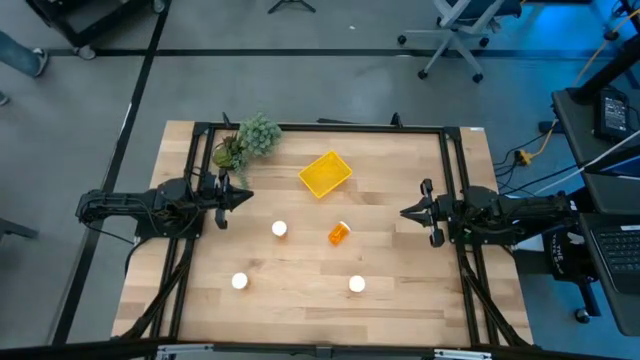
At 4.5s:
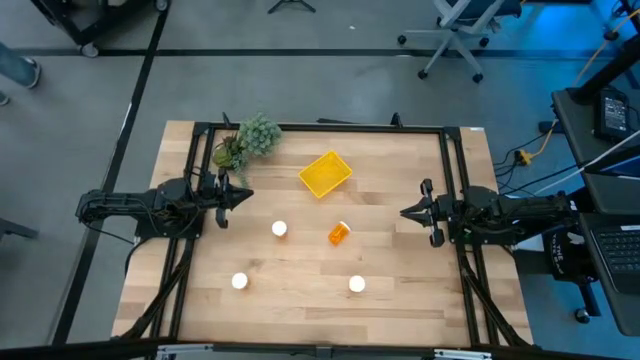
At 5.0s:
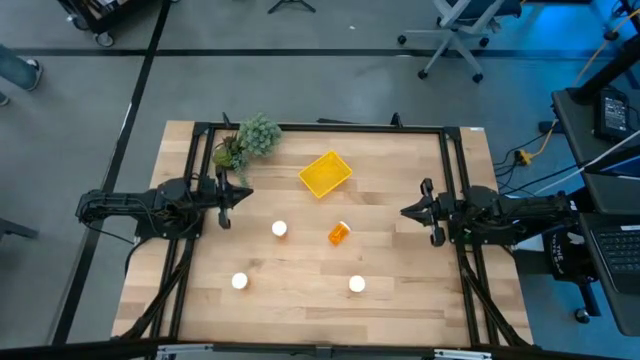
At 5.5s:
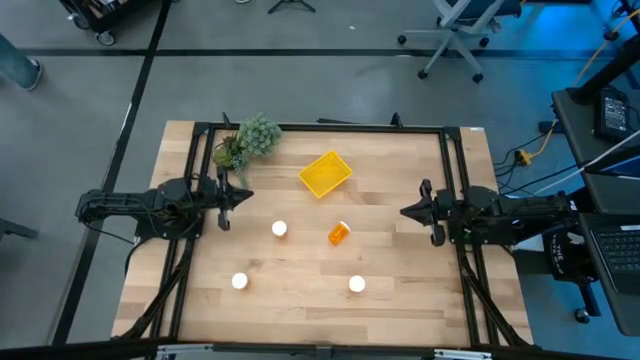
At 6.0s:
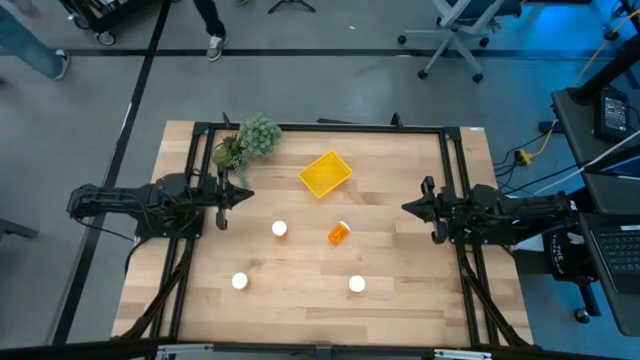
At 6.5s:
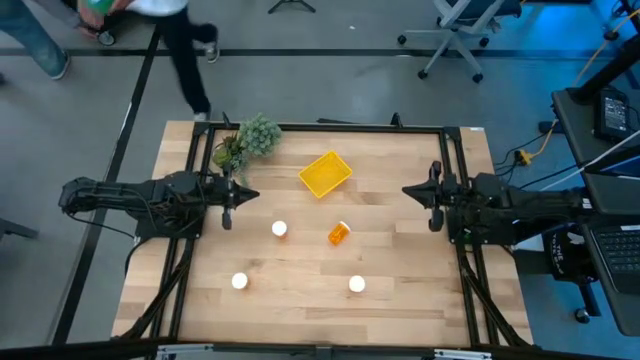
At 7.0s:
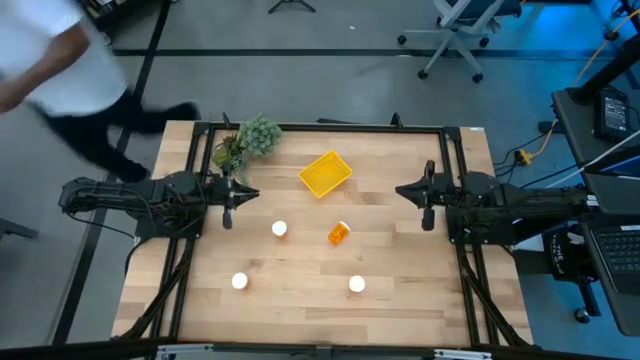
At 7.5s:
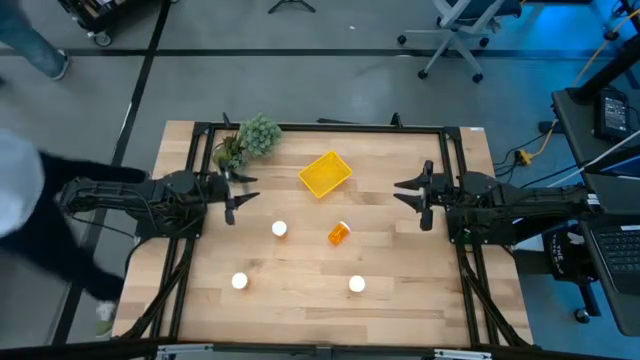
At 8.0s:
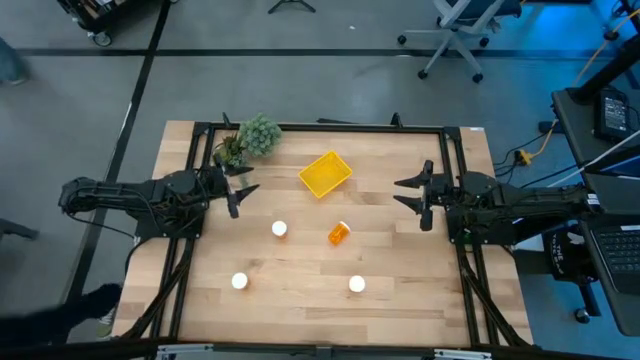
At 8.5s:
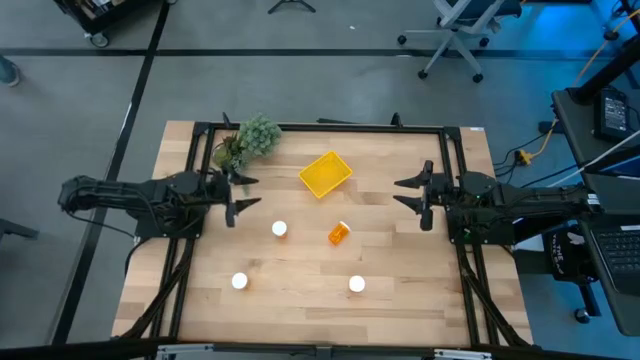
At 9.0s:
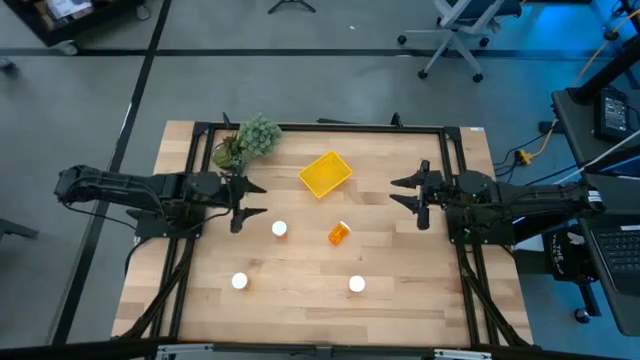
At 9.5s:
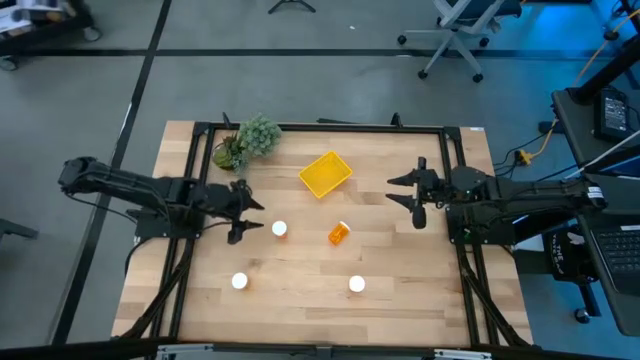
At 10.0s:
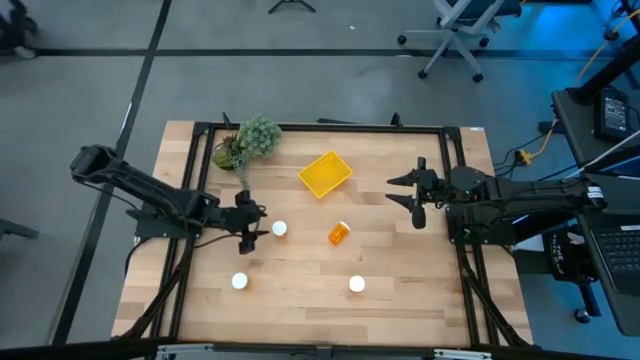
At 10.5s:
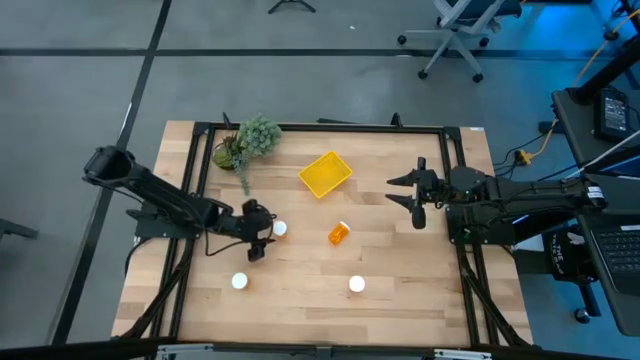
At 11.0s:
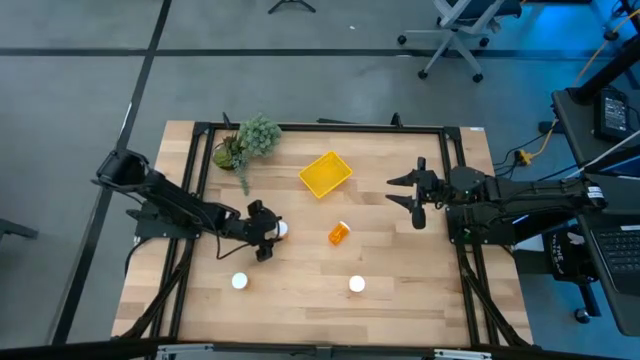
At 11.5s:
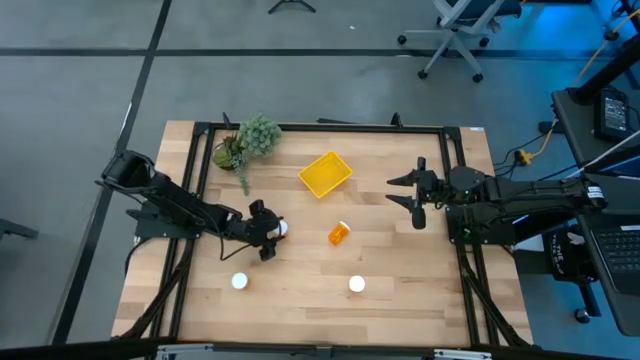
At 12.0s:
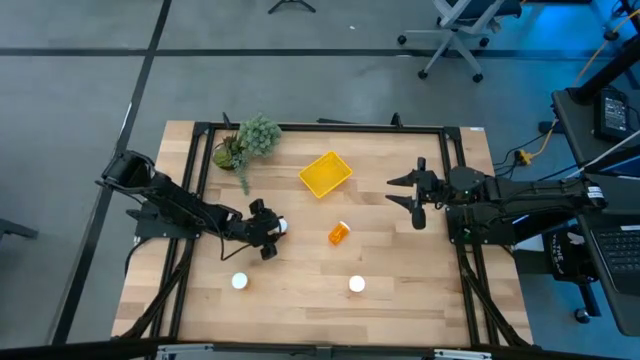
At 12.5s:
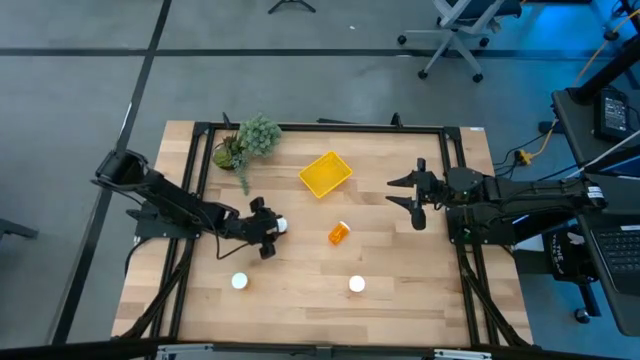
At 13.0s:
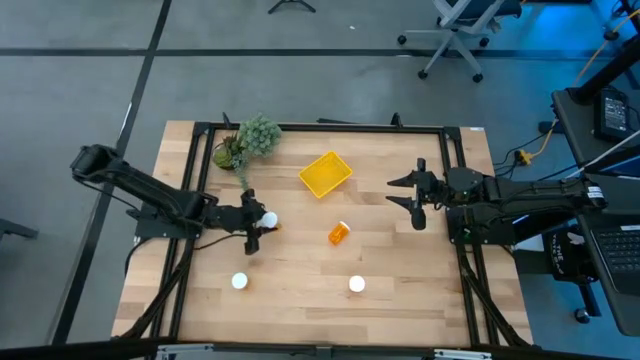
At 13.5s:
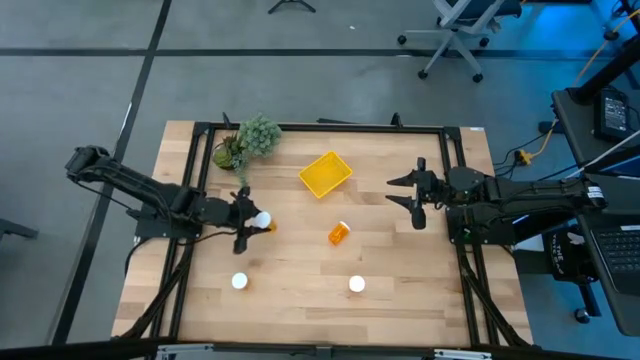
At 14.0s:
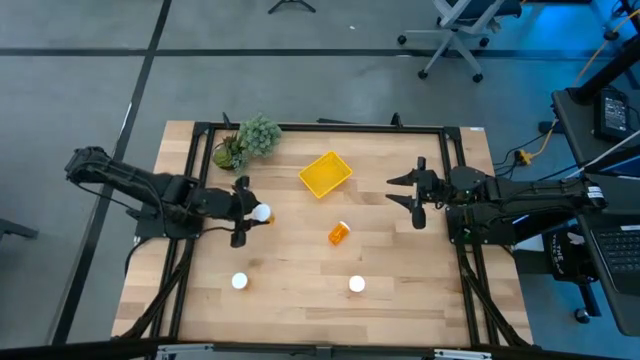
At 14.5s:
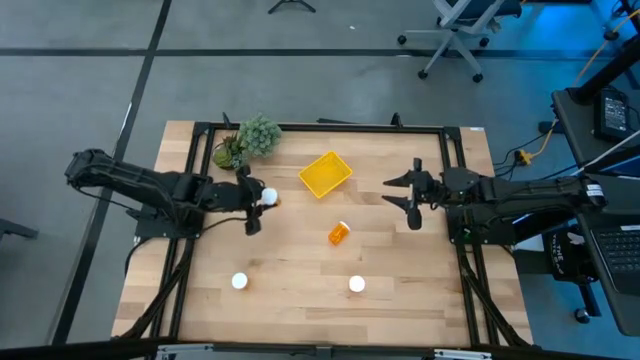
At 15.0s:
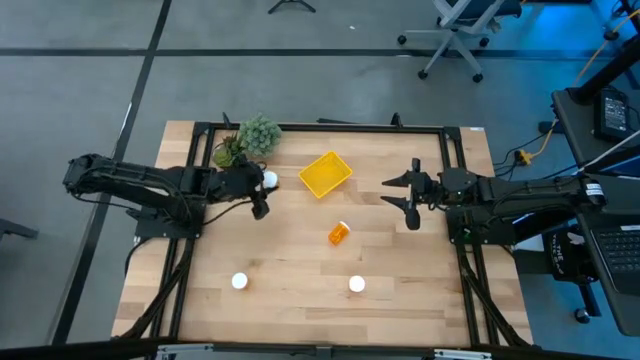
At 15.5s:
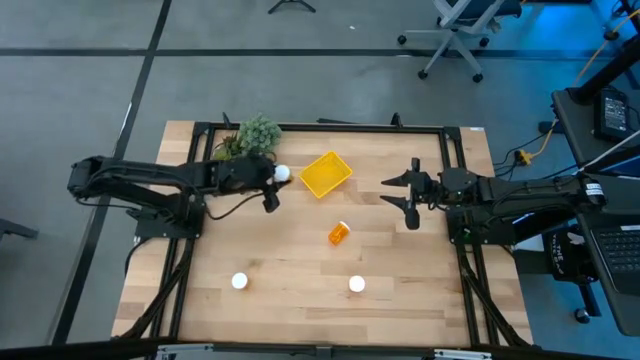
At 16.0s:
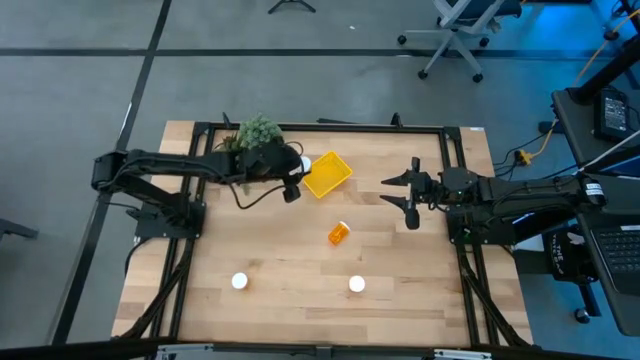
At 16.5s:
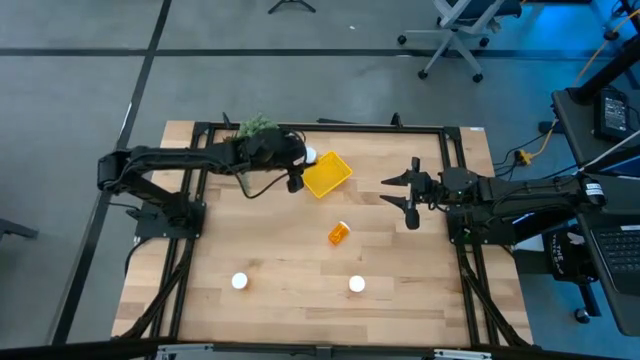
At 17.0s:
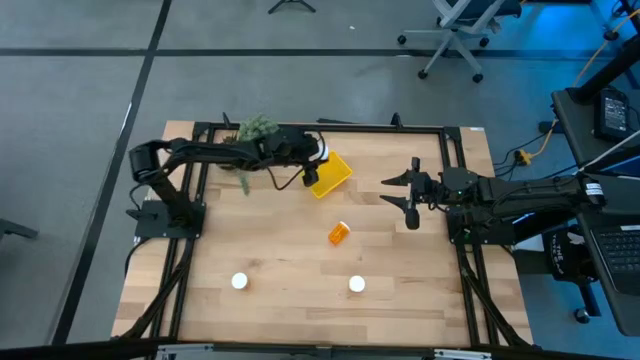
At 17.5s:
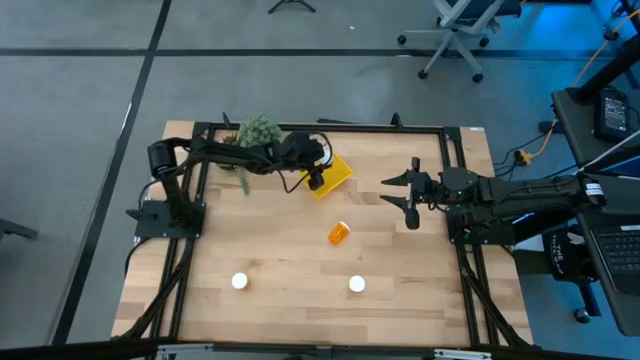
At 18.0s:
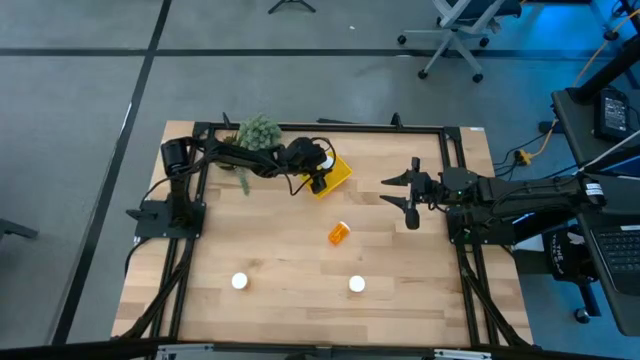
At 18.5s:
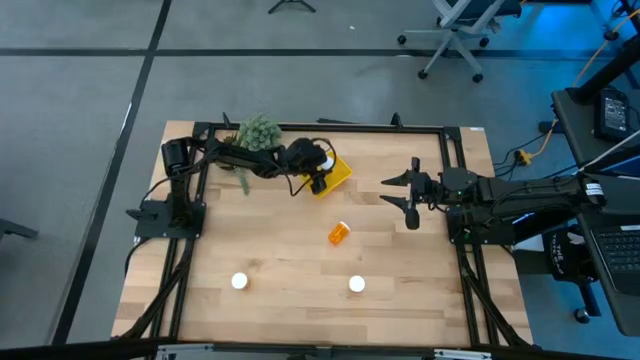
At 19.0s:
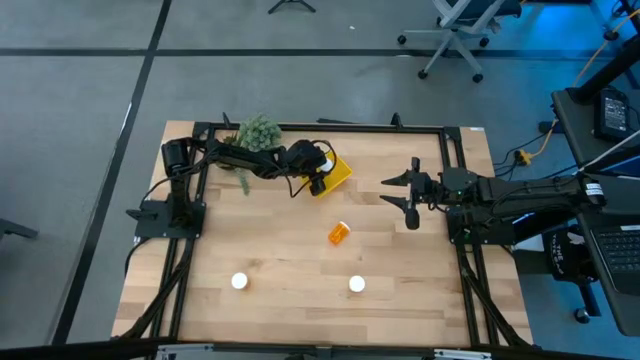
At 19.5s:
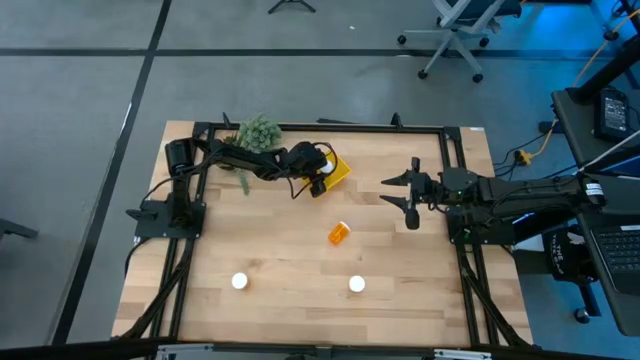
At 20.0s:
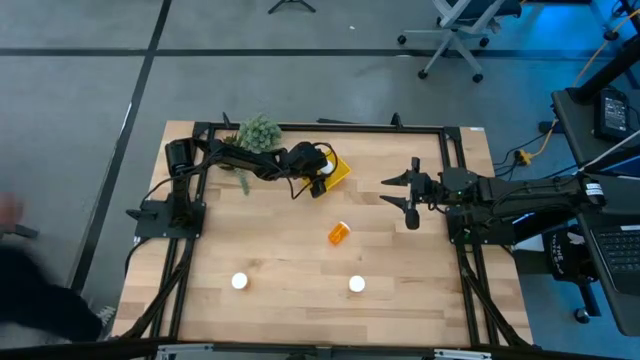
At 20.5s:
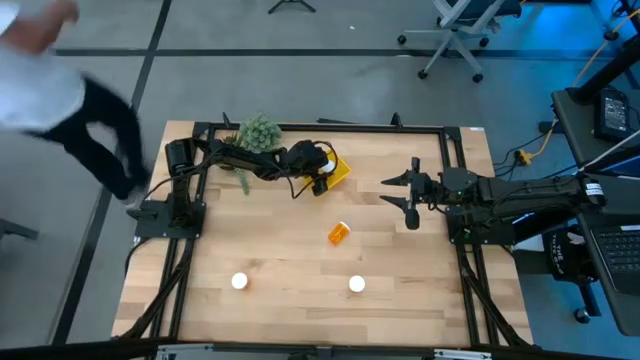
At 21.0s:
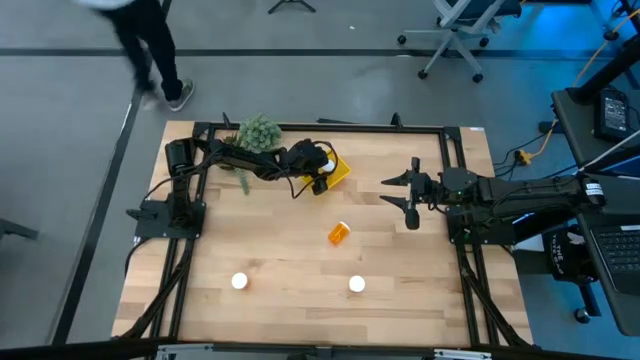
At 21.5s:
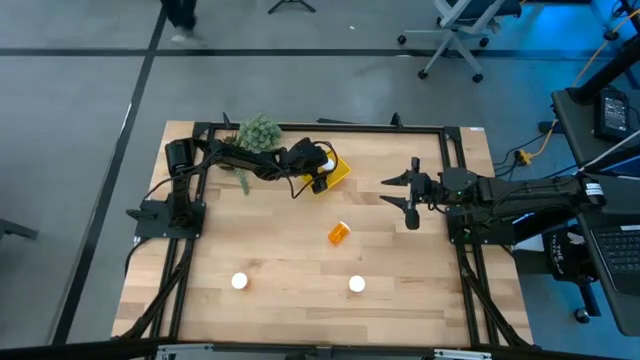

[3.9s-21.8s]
Task: Pick and place pill bottles into a basket
Put the orange pill bottle into the yellow bin

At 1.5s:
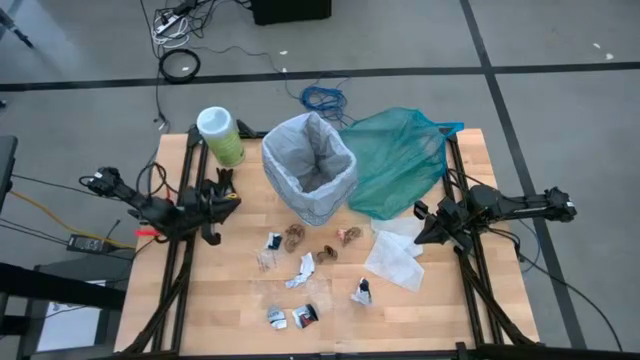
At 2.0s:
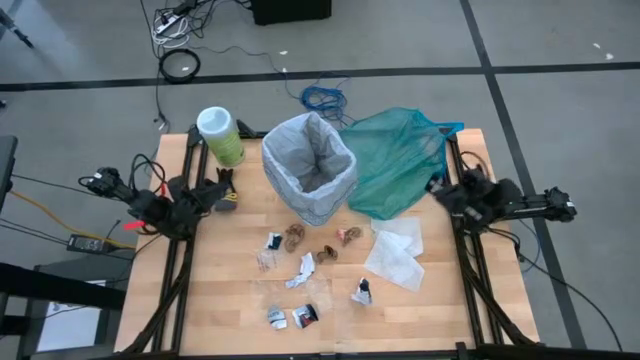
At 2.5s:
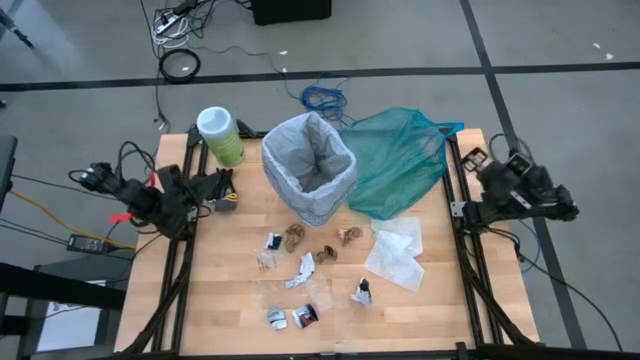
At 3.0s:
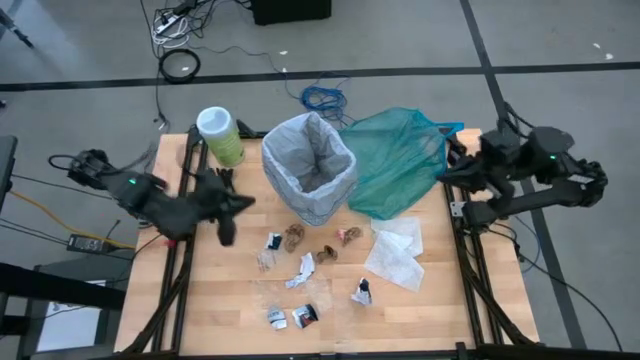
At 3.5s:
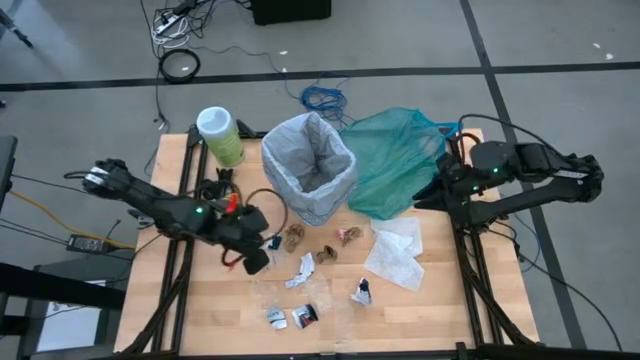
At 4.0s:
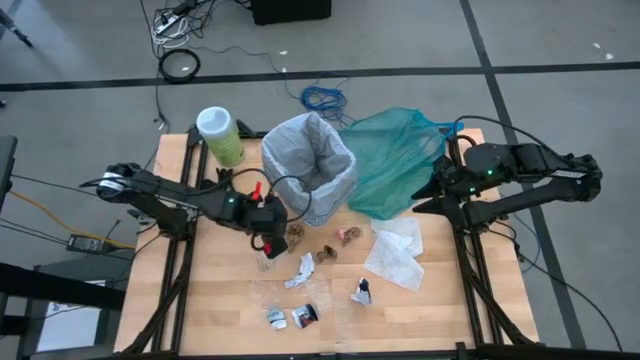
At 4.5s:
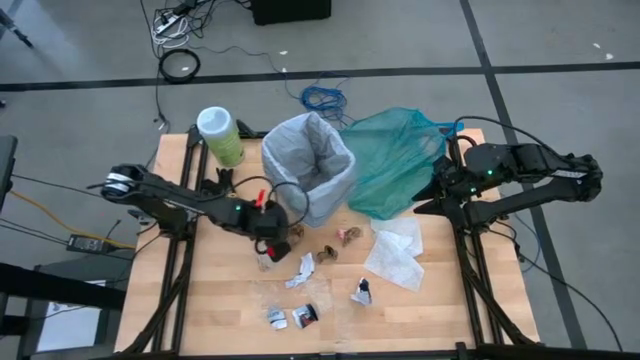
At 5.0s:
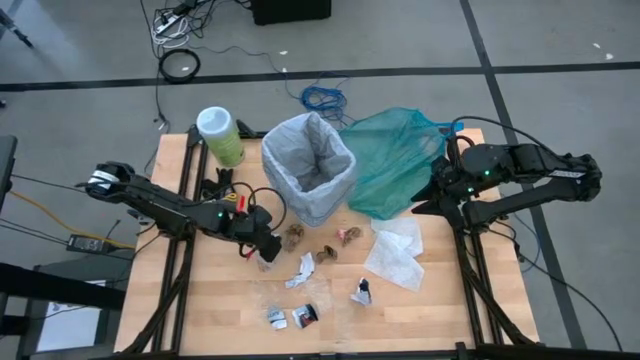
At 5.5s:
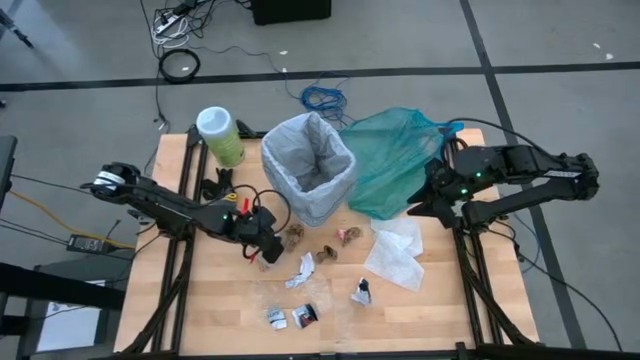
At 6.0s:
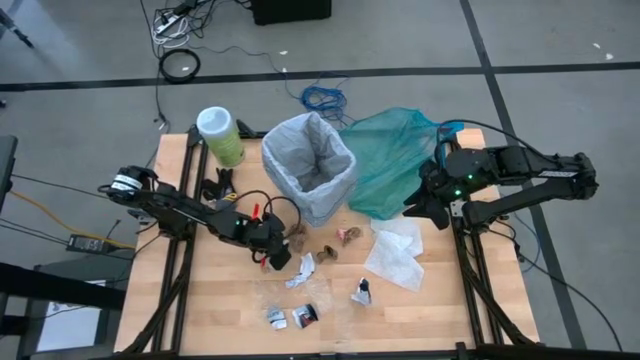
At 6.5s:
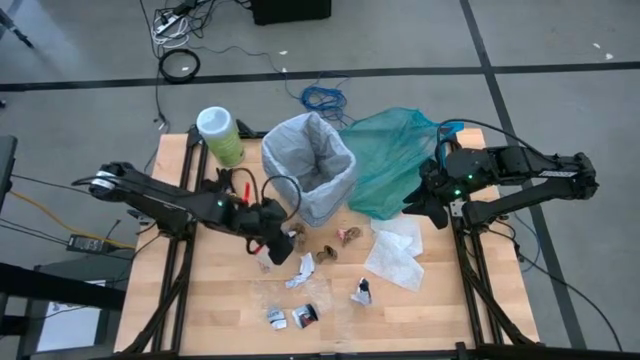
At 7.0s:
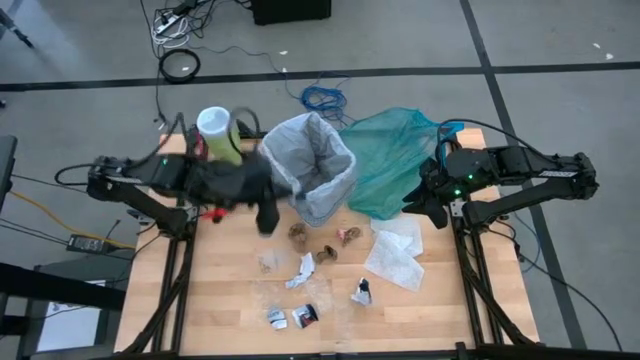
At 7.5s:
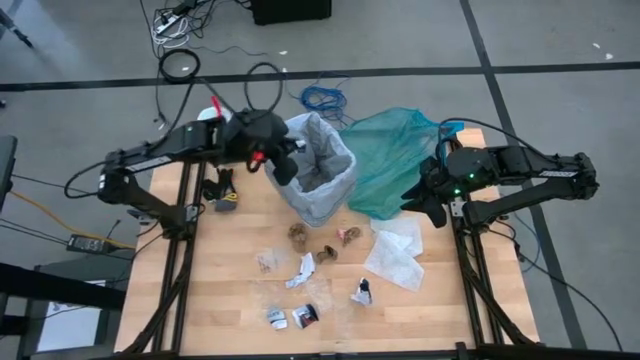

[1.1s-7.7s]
Task: place trash/remove bag and relplace
Put the dark blue paper into the trash bin
